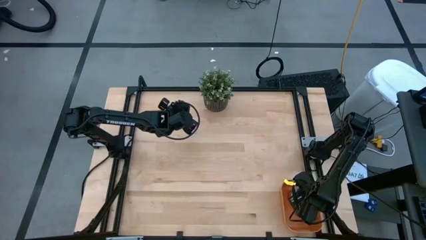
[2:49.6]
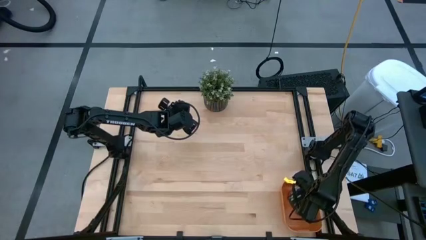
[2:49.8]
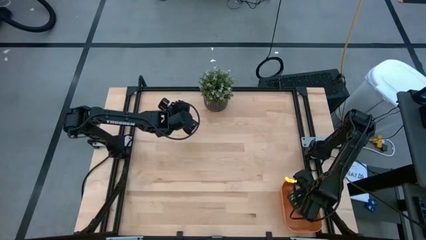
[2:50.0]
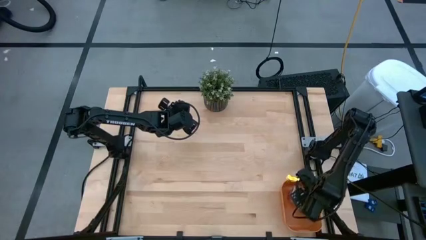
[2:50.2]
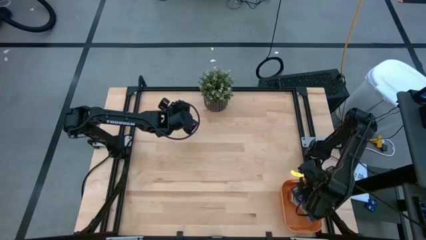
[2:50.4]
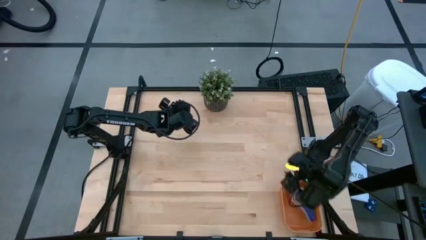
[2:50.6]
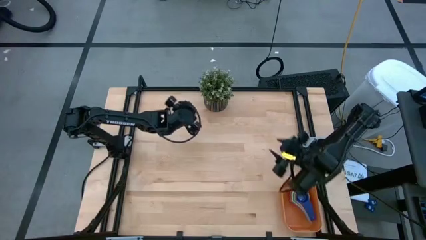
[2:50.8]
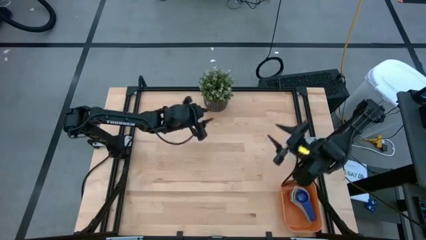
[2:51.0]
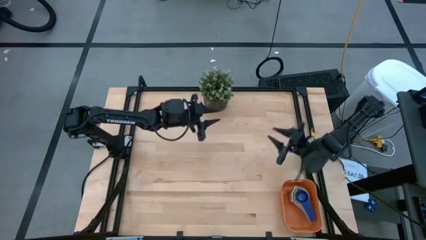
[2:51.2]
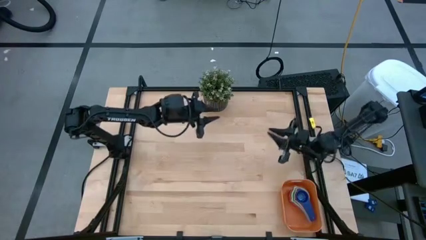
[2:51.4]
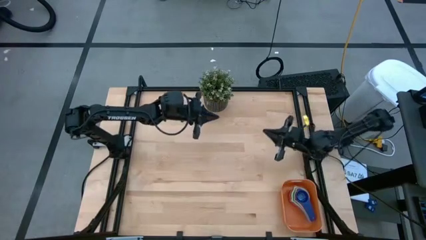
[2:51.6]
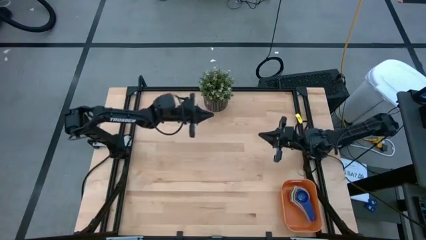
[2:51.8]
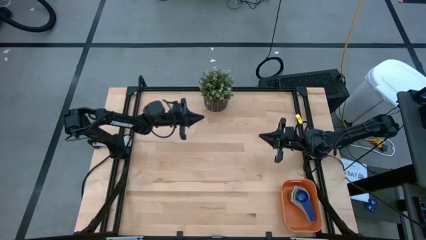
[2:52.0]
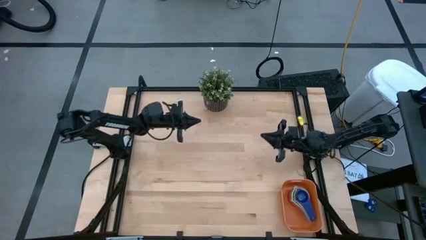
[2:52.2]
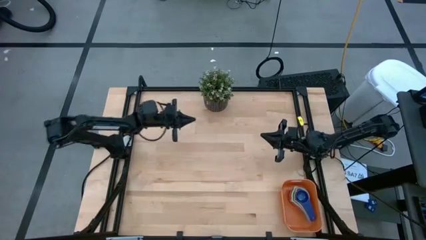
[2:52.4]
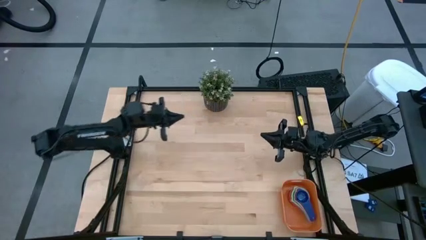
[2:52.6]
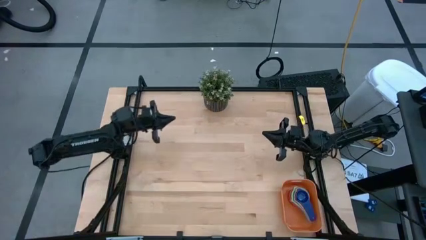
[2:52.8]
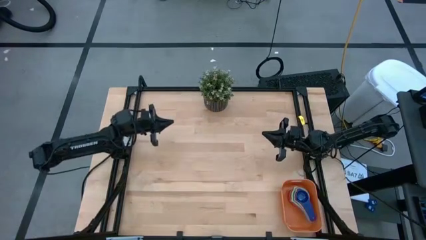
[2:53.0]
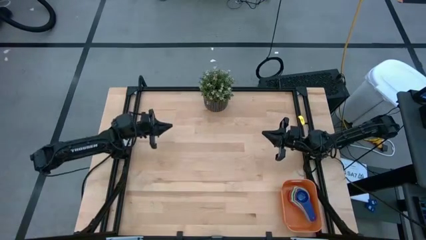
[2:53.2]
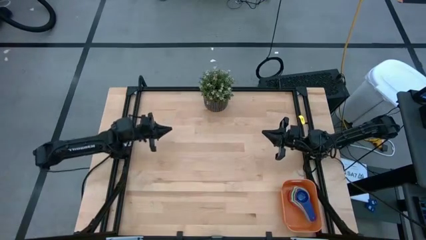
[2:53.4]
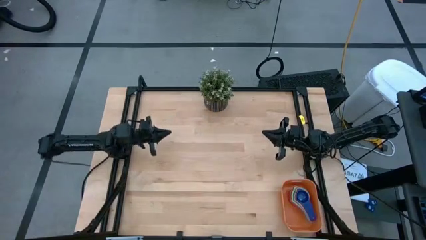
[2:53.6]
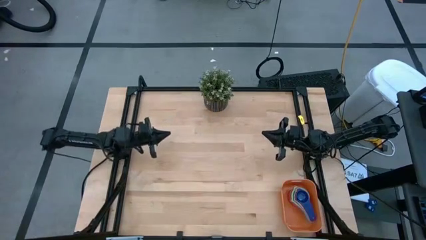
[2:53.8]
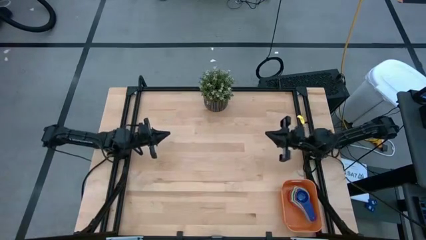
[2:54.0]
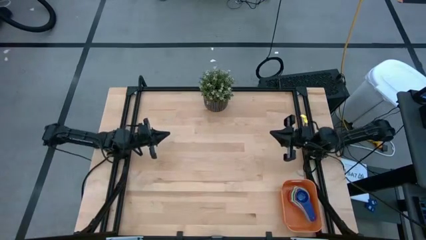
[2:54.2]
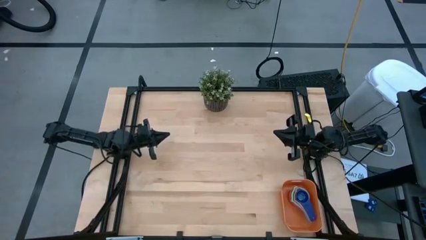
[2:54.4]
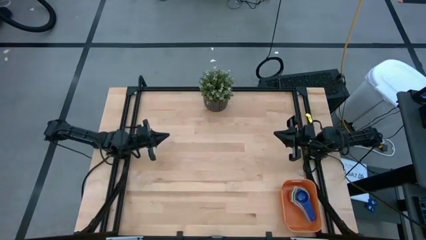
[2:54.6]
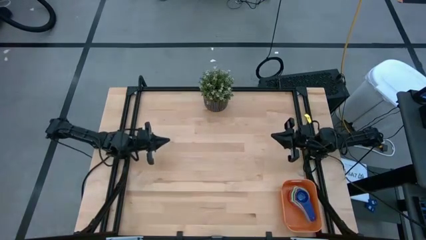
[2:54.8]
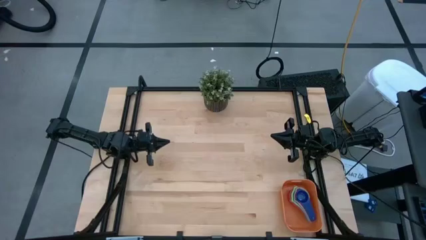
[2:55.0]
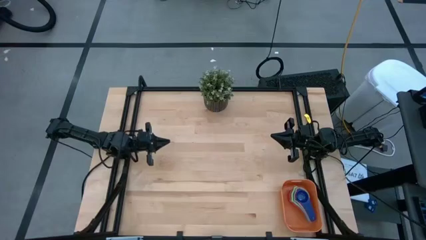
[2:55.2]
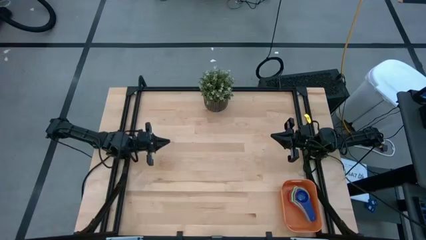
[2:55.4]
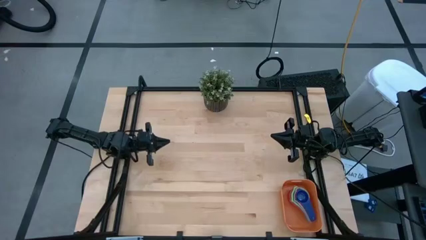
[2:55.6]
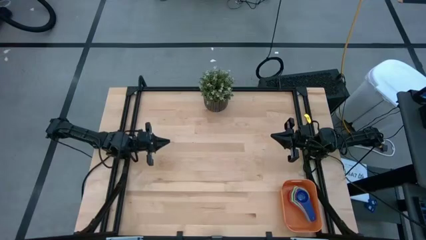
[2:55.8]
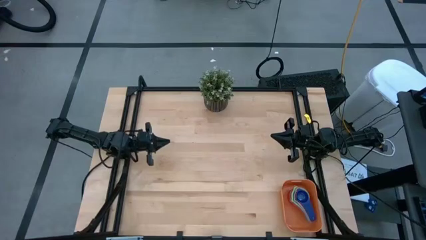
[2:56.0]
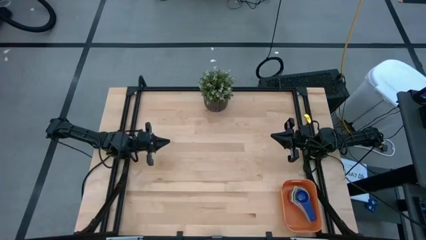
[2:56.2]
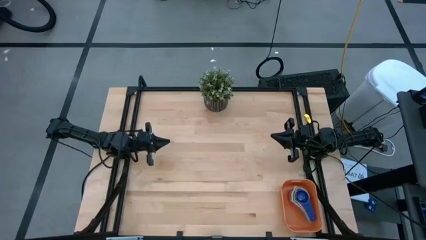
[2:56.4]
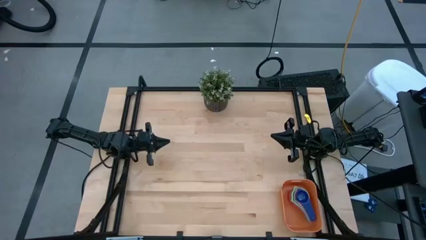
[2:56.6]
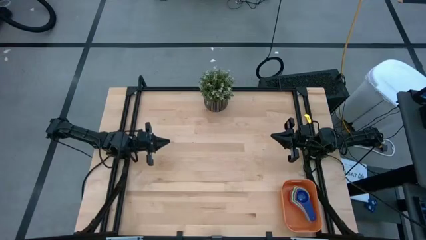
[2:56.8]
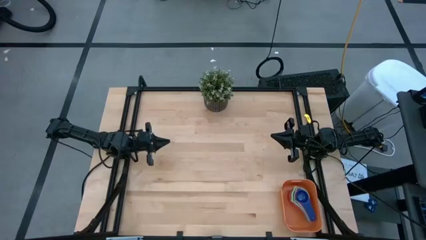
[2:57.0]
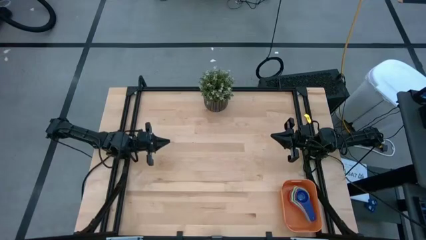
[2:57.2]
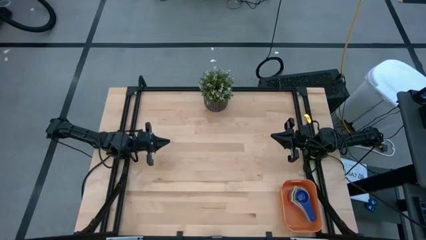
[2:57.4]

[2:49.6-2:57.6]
Task: Nest measuring cups in basket
Return to Home Position

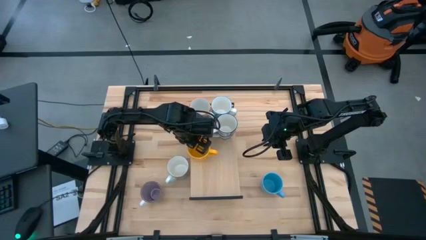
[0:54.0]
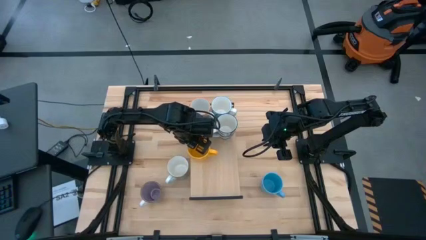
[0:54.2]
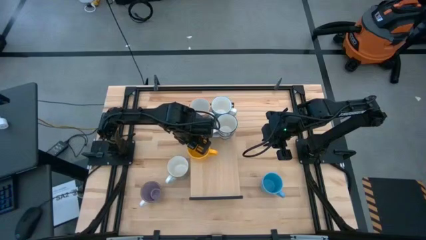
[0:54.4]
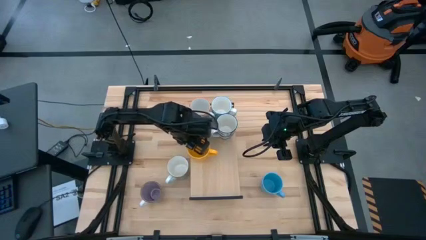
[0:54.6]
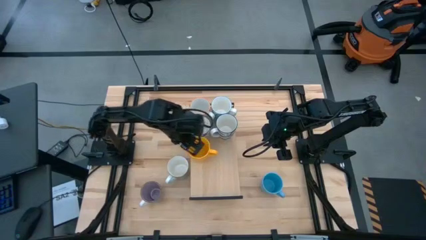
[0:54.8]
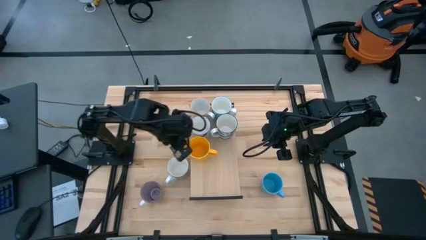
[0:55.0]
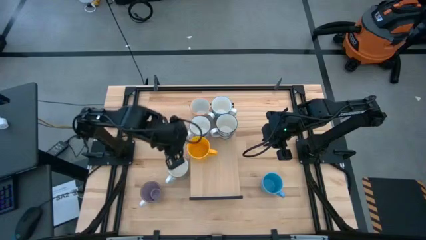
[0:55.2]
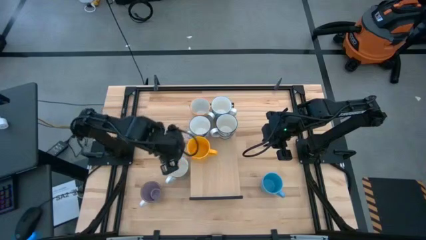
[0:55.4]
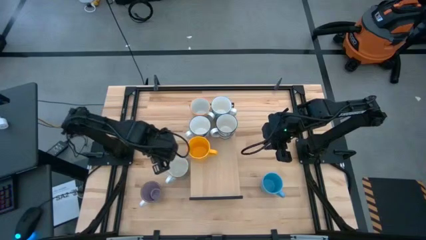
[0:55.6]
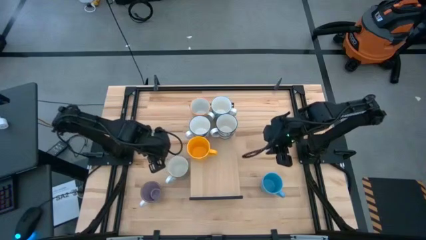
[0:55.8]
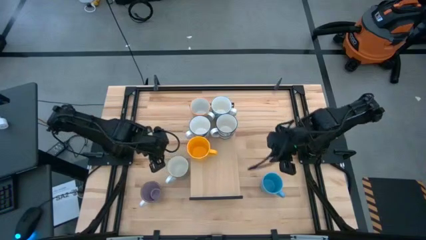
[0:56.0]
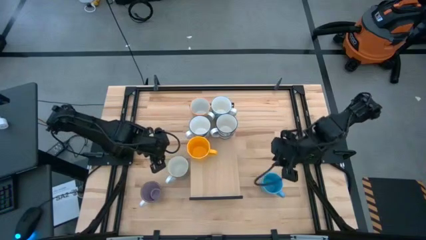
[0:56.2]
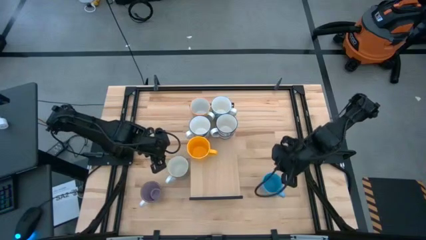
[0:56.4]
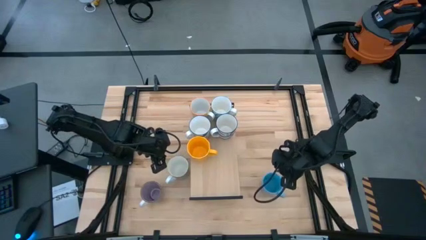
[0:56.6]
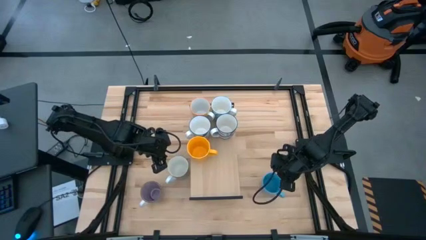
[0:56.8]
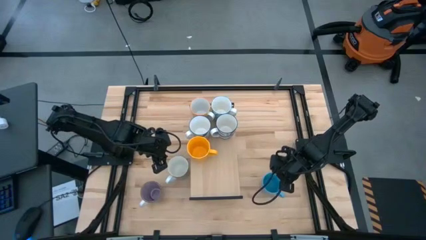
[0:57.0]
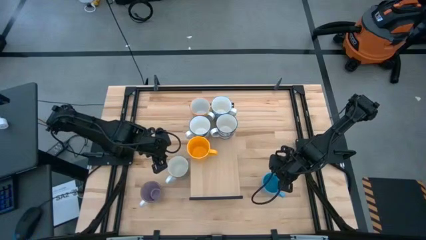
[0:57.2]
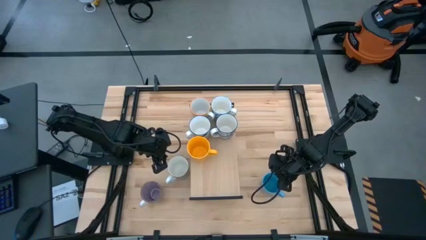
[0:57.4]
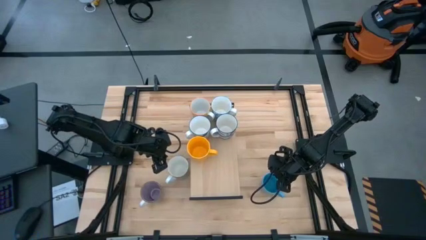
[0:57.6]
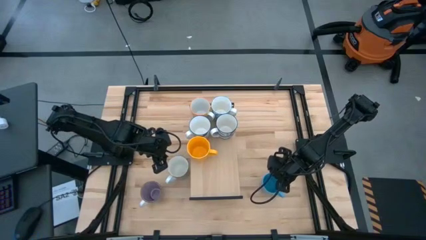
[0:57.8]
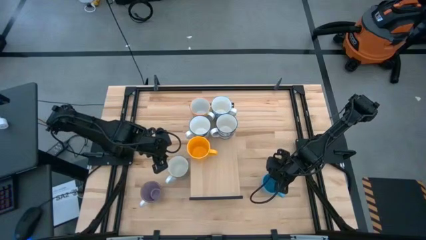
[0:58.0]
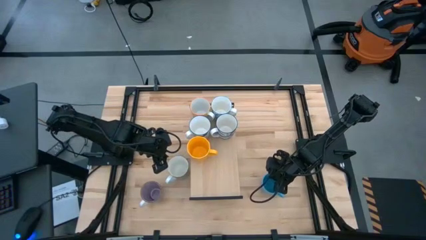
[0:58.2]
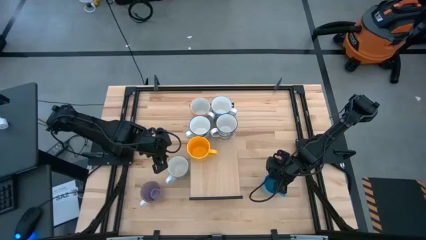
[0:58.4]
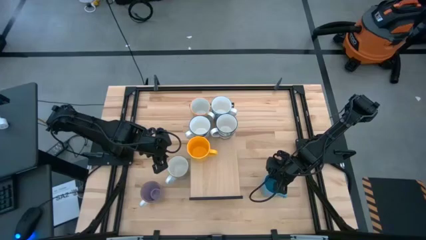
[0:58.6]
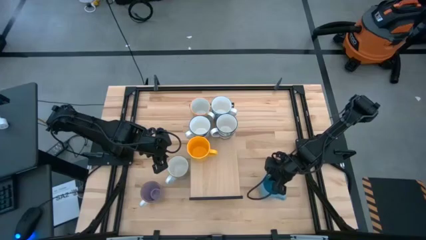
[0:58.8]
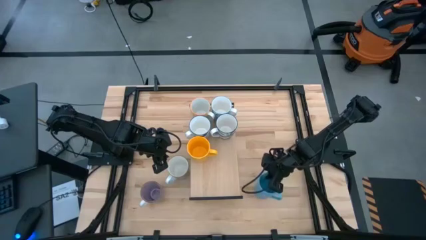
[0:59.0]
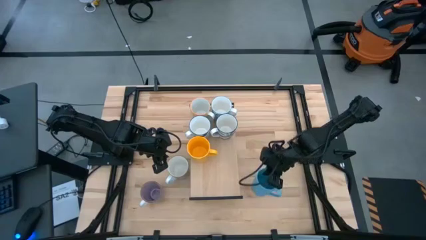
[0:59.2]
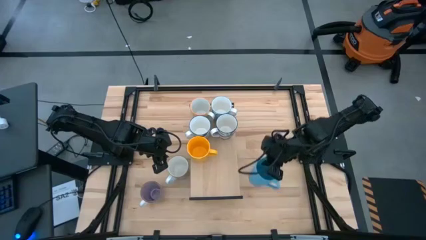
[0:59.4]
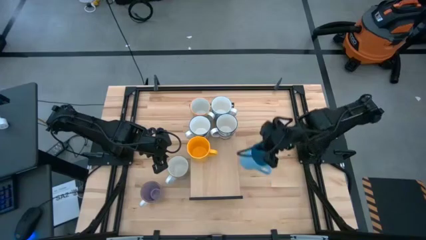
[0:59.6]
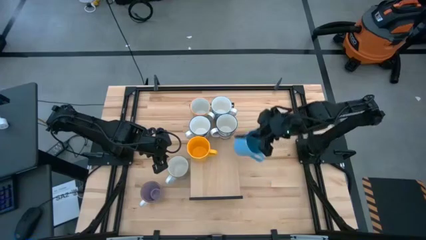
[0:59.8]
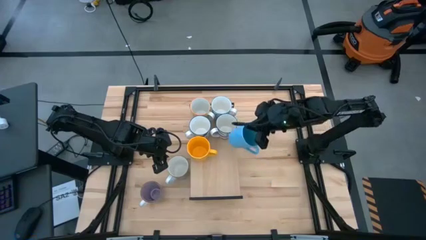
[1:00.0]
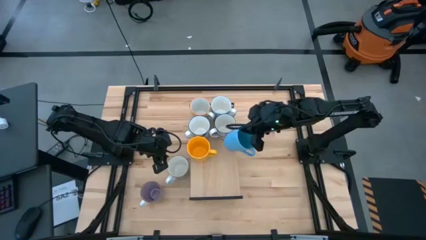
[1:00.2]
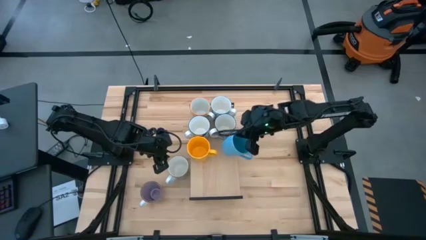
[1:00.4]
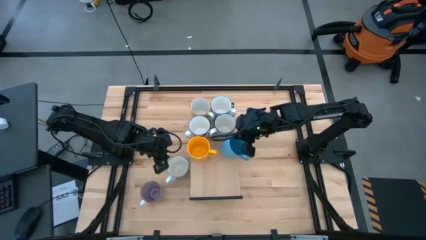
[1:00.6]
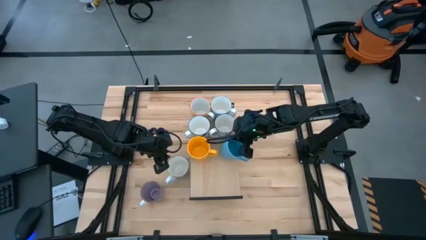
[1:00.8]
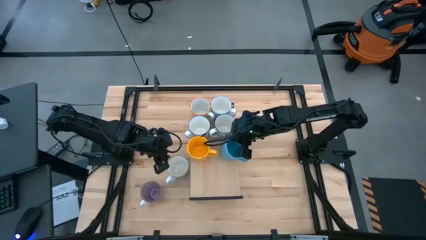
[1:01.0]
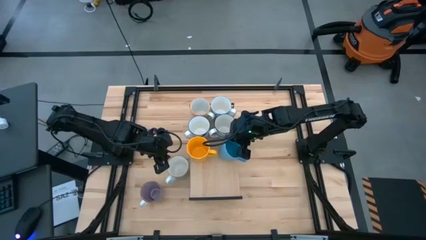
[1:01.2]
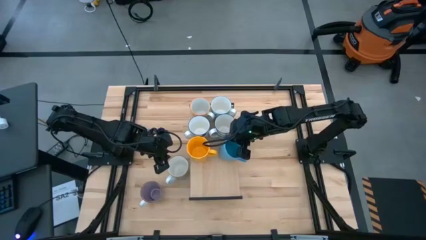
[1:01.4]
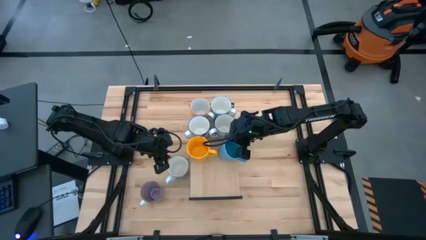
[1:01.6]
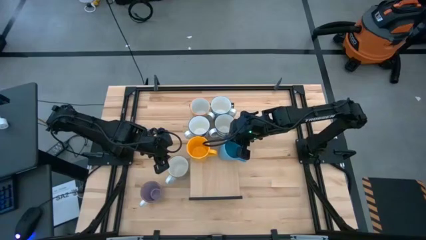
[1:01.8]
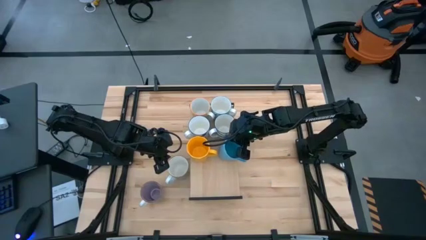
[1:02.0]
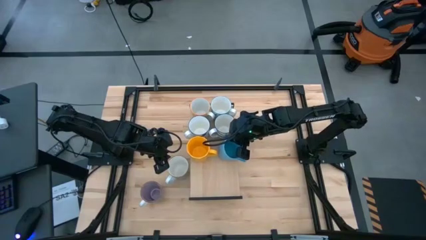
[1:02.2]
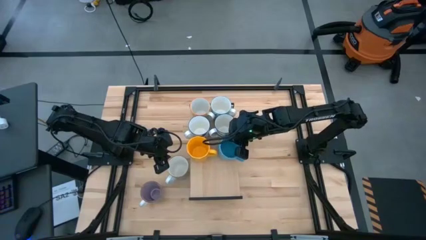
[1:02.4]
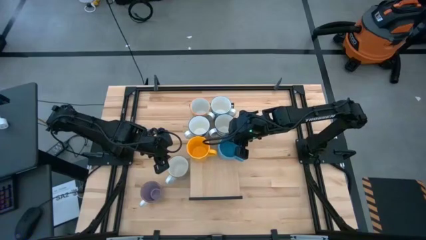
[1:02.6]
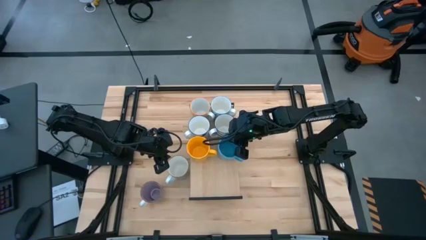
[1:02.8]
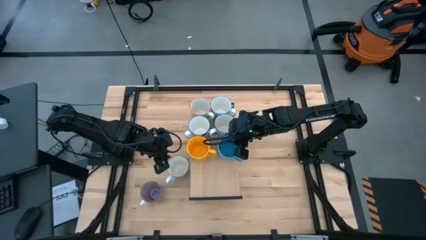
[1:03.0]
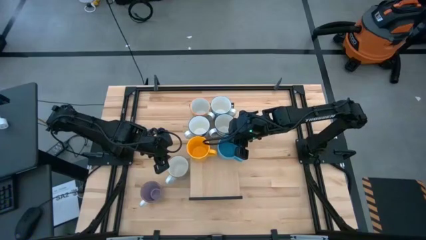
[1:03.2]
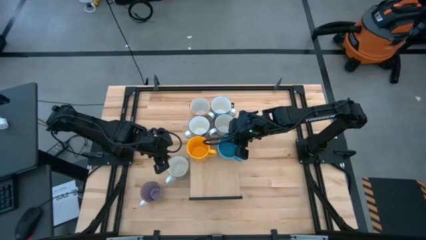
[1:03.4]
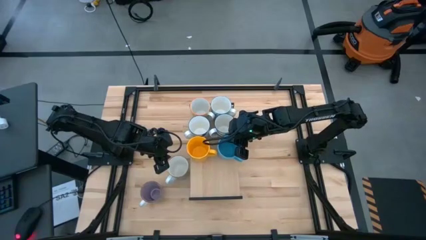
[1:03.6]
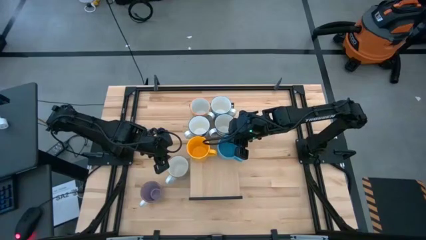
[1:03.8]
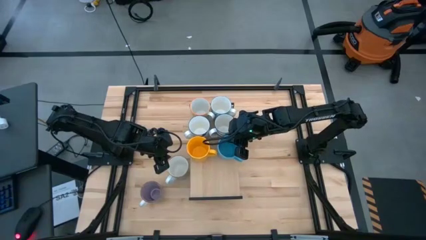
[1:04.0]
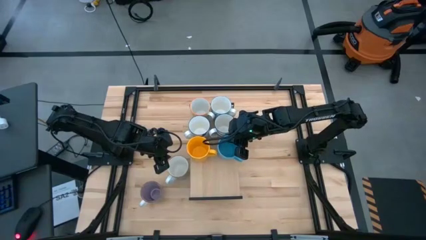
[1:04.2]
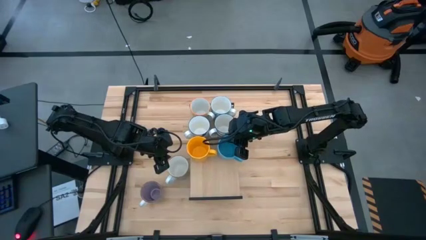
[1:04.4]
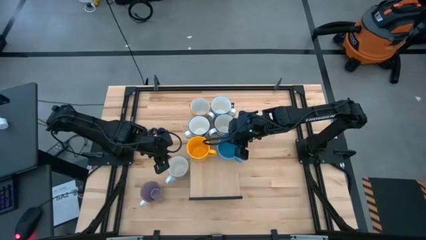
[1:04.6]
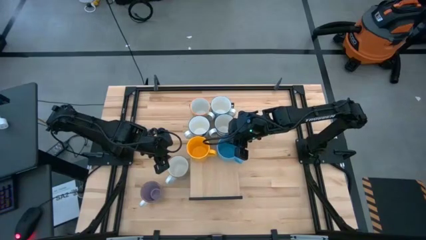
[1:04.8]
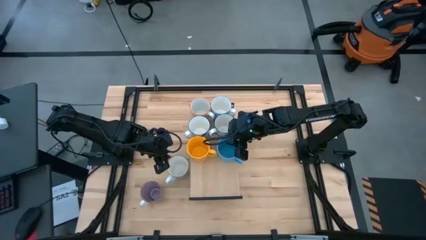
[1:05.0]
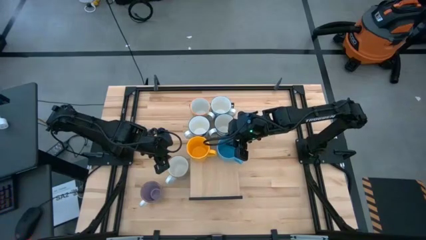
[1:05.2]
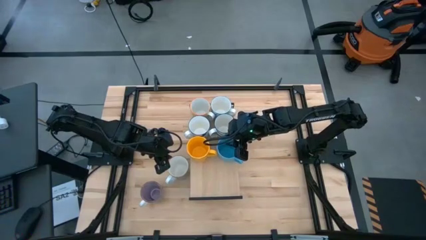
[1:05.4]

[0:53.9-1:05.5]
Task: Place coffee mugs
Put the light blue mug on the shelf
